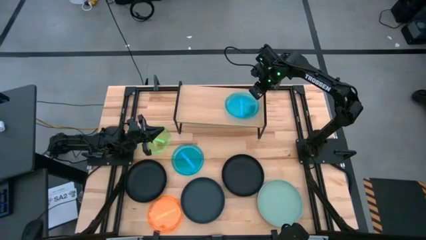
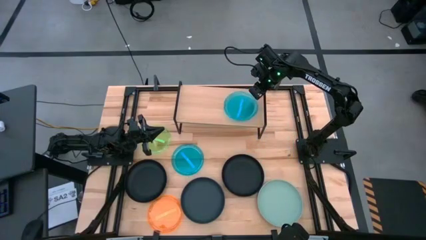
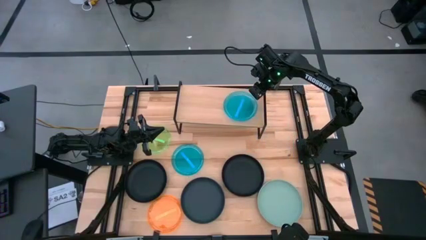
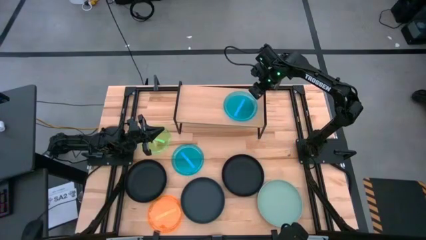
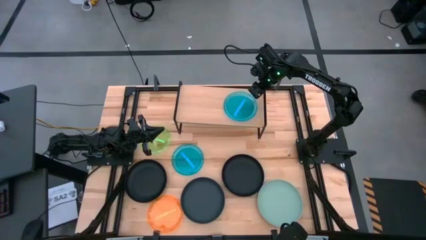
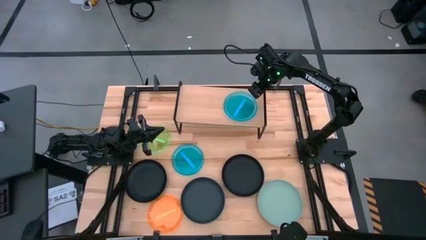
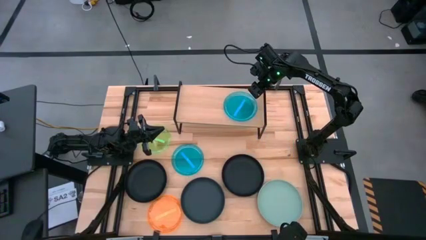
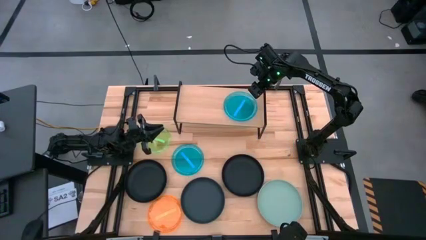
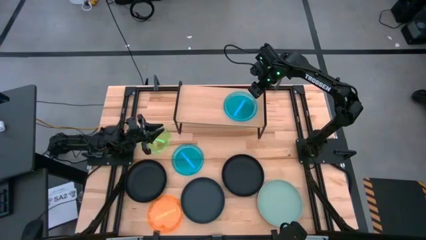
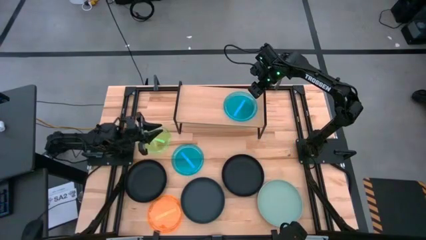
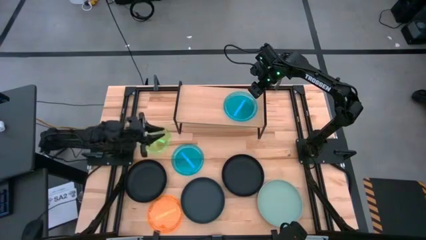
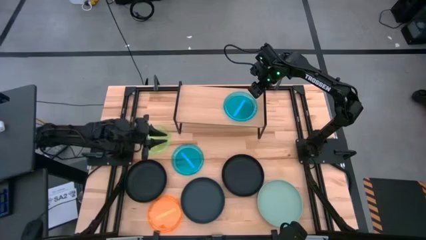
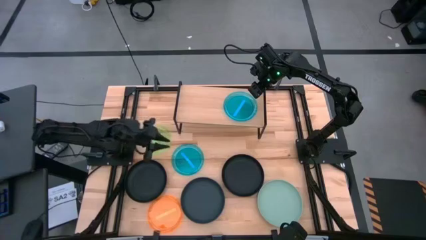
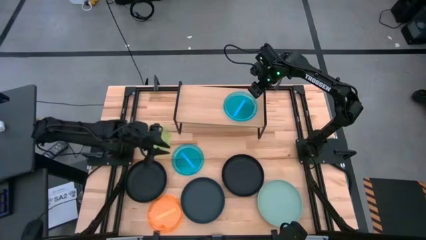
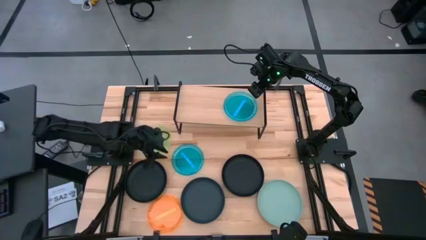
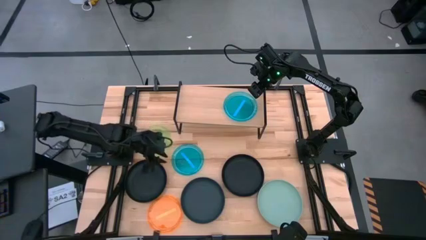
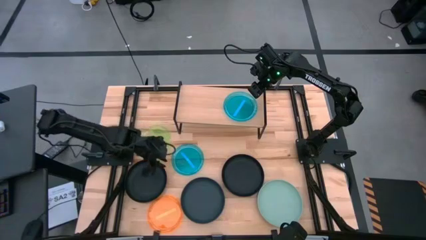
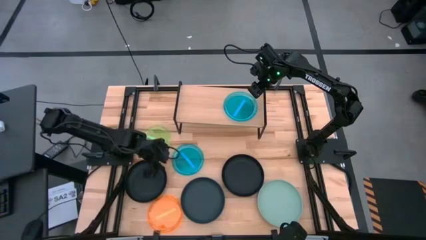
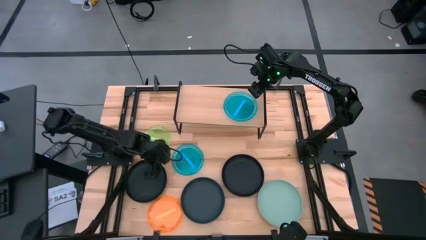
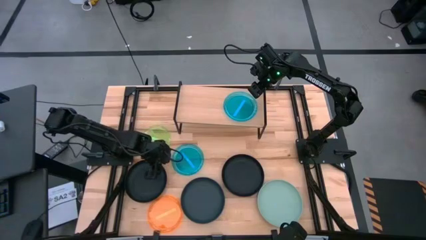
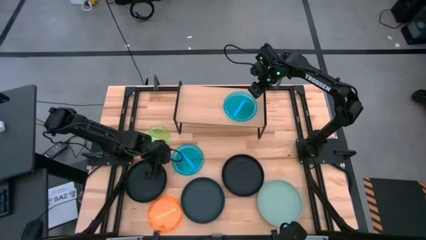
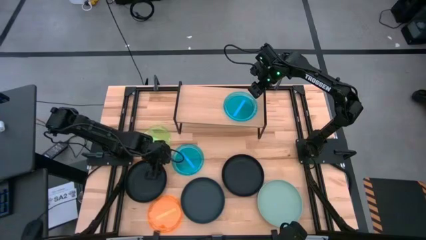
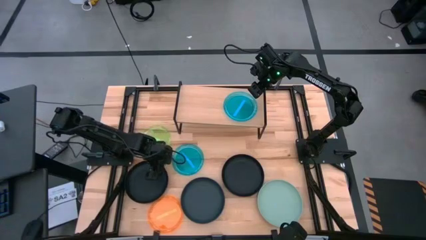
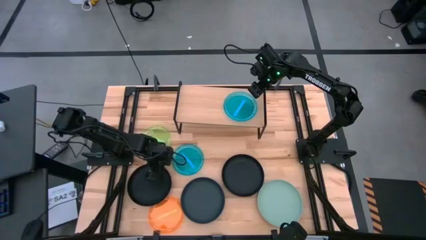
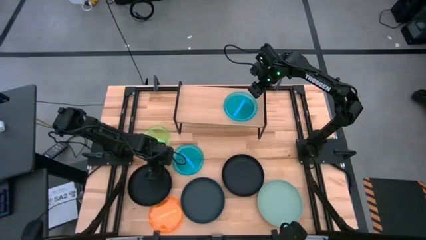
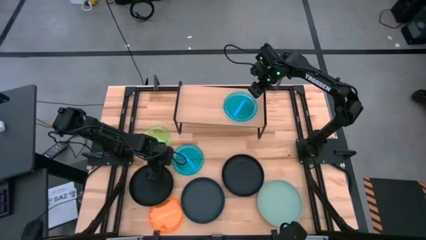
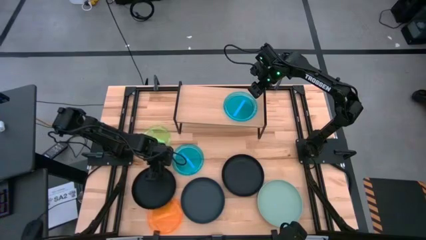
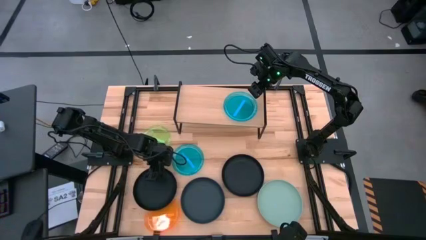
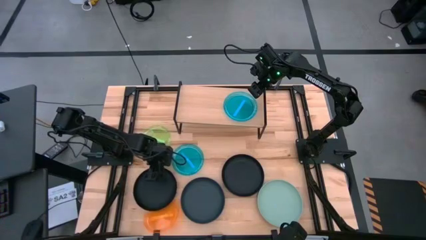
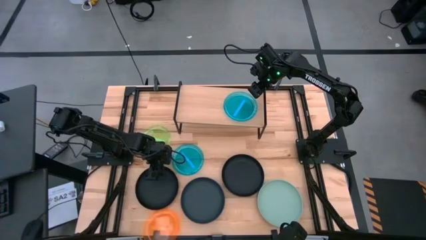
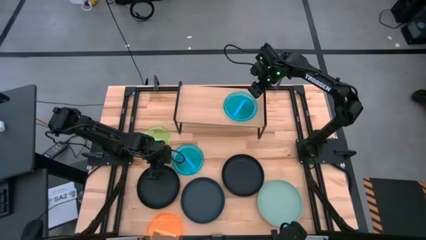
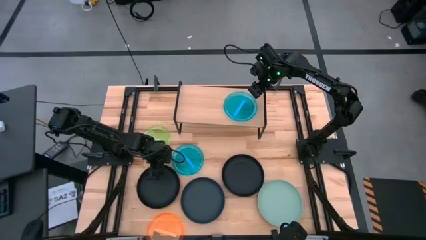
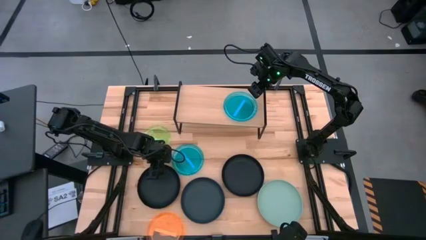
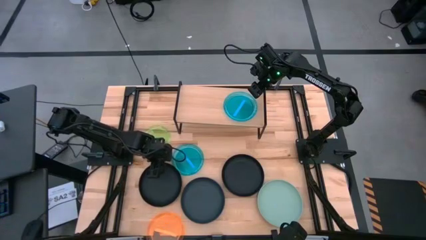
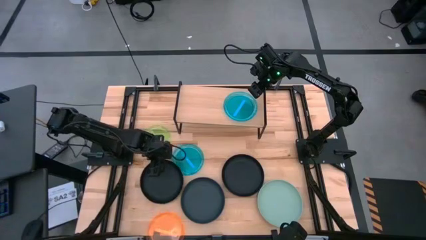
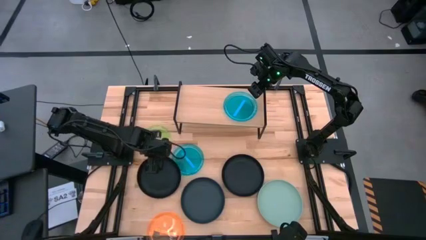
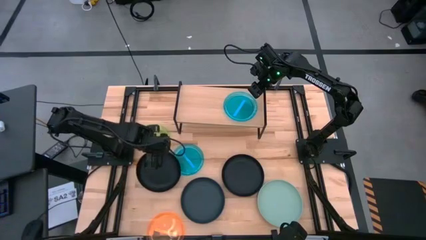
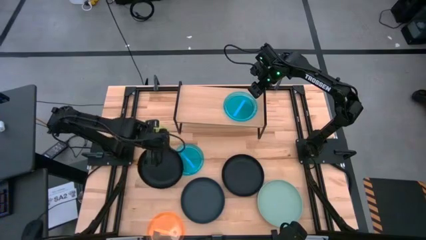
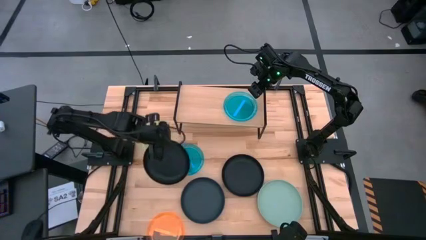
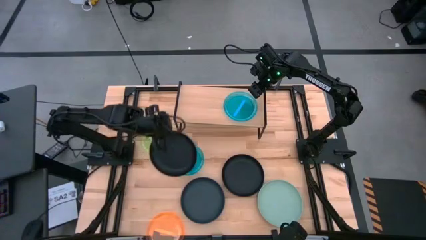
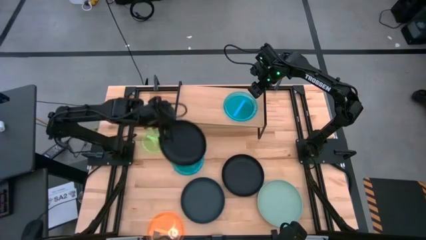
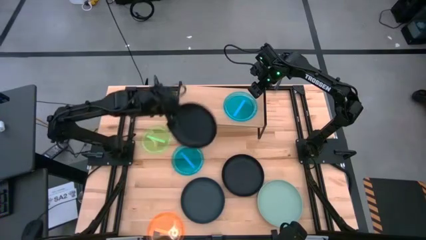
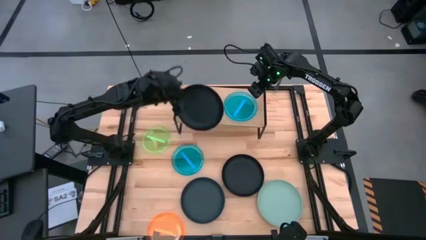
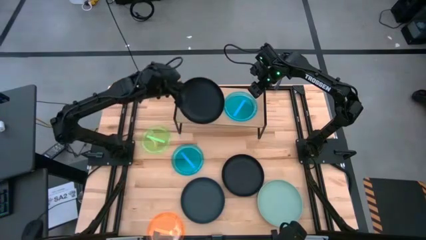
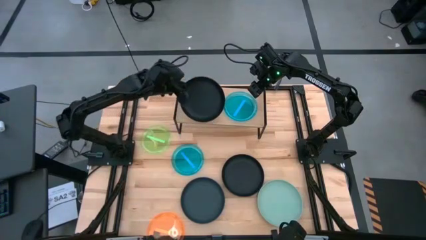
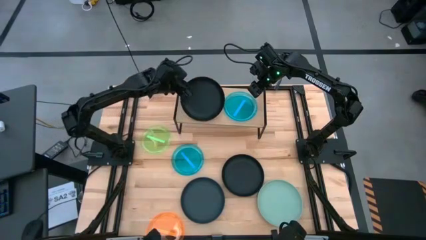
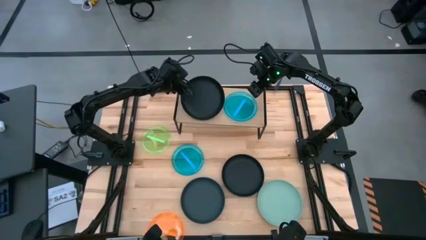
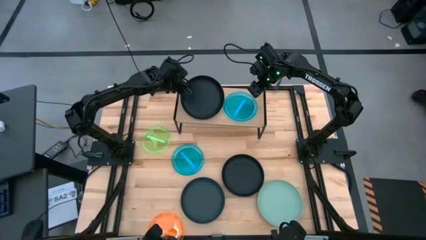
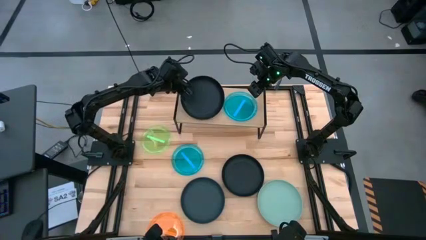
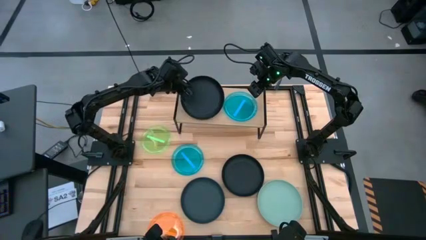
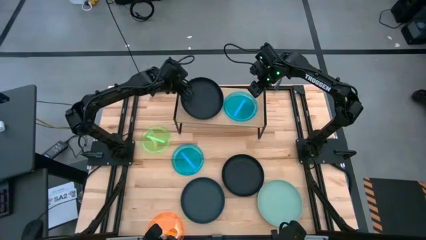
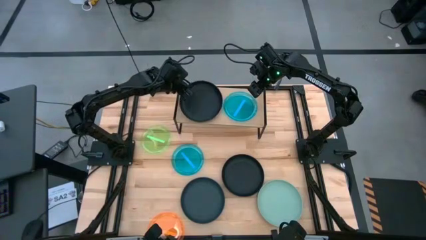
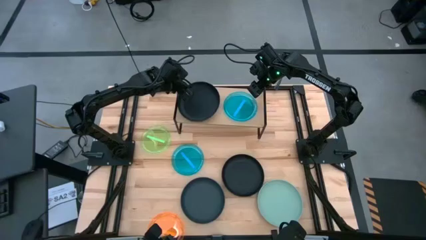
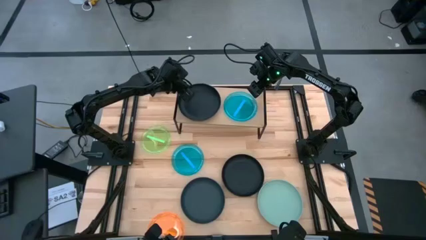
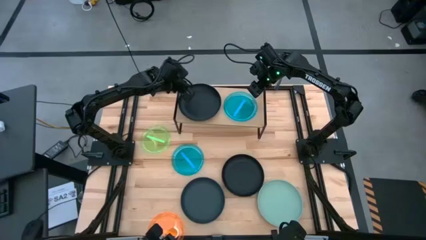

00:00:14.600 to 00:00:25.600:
Task: Place and stack plates onto a shelf
Put the left black plate on the shelf
